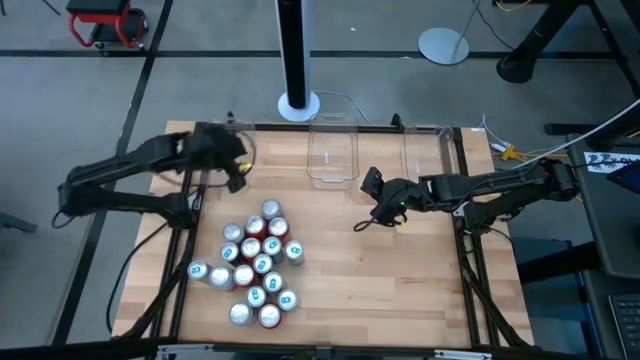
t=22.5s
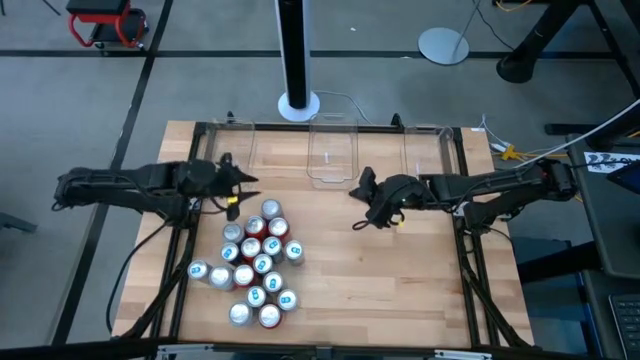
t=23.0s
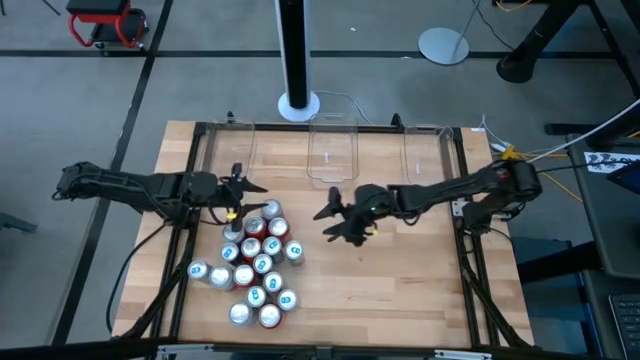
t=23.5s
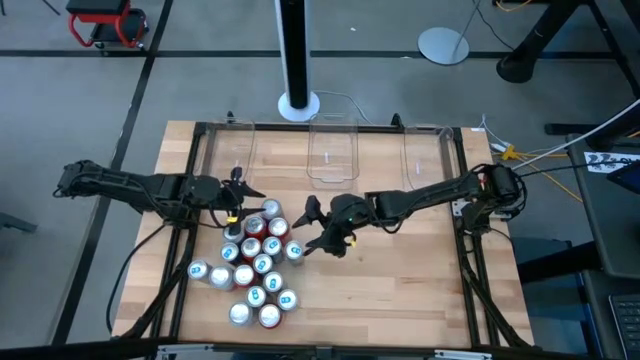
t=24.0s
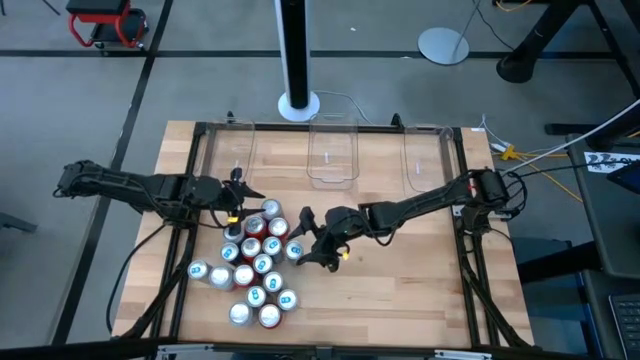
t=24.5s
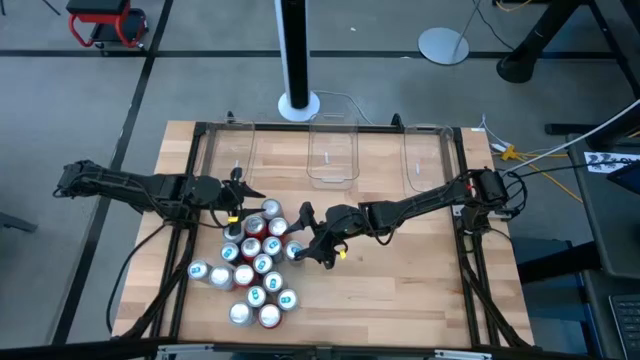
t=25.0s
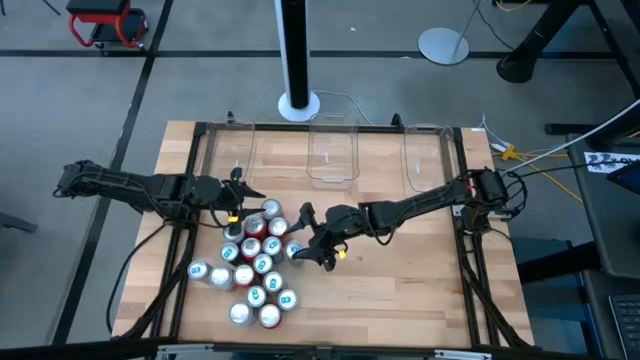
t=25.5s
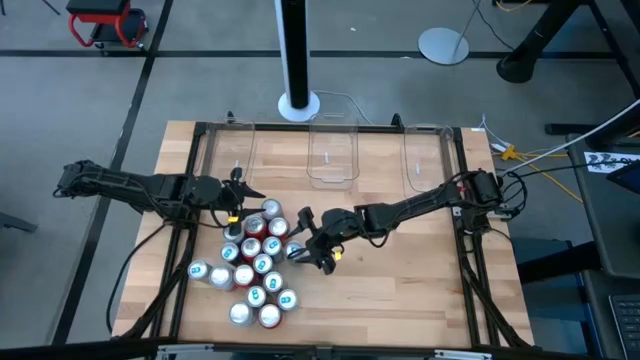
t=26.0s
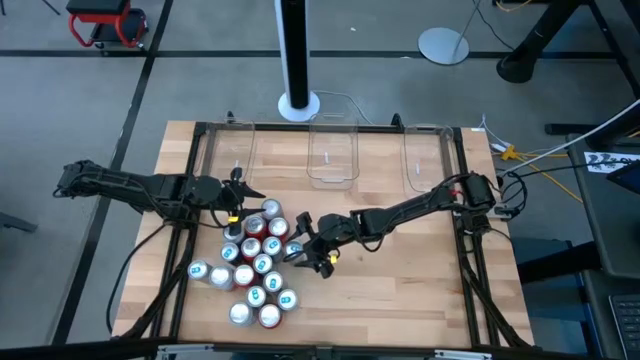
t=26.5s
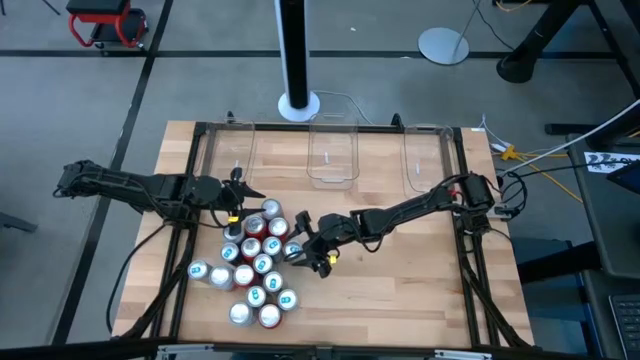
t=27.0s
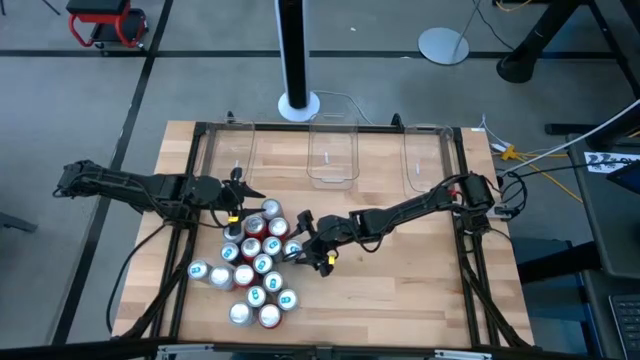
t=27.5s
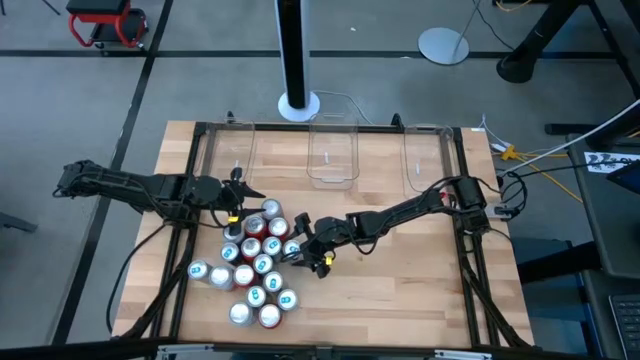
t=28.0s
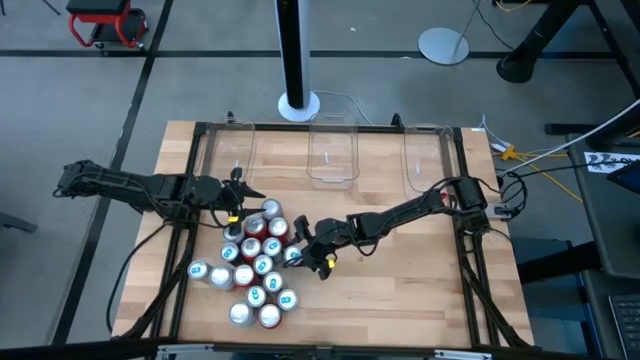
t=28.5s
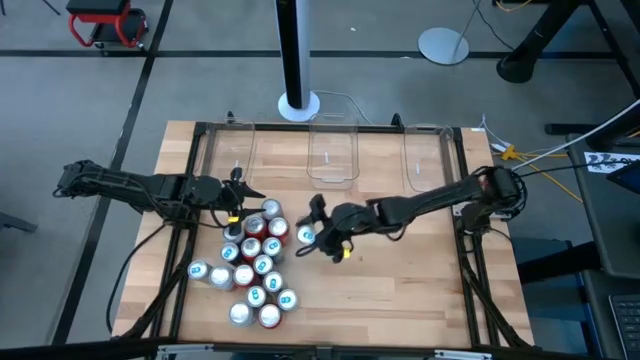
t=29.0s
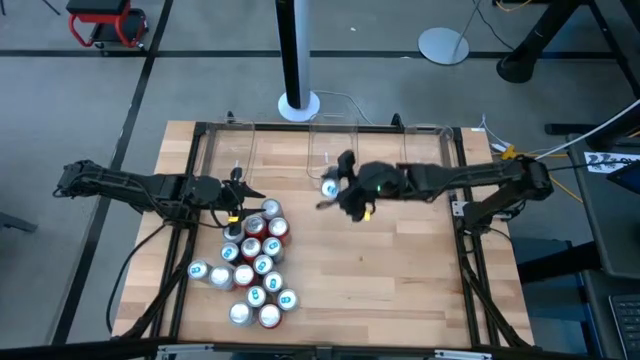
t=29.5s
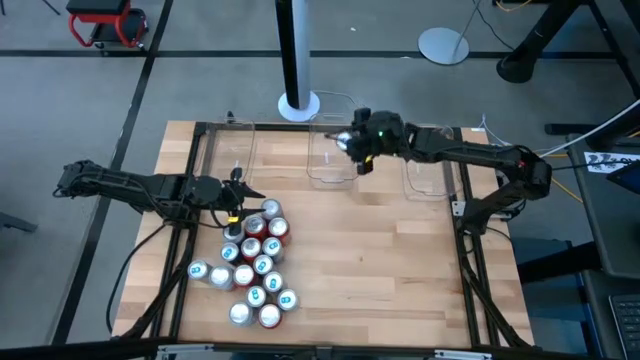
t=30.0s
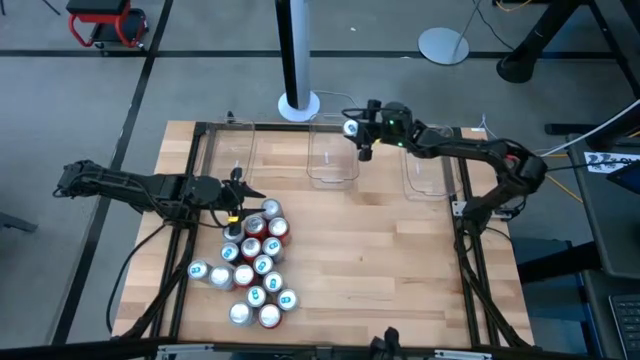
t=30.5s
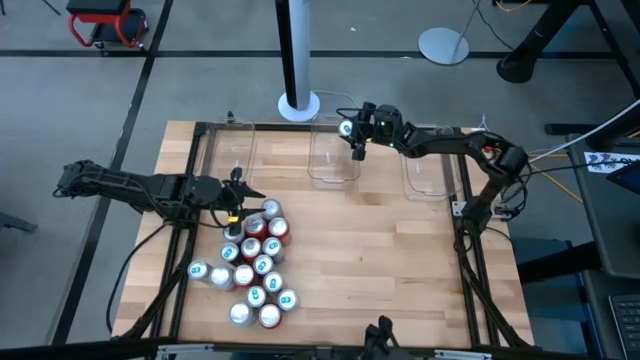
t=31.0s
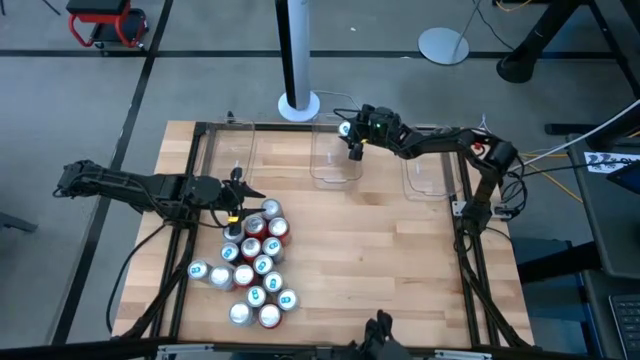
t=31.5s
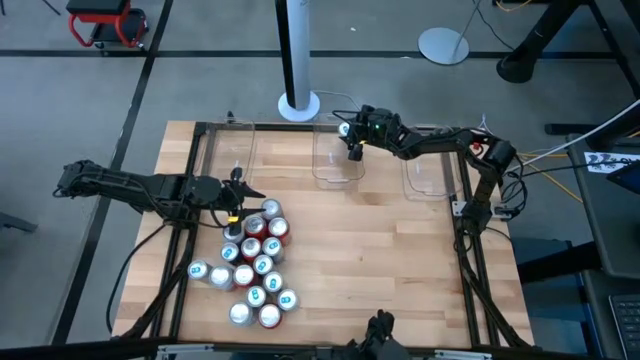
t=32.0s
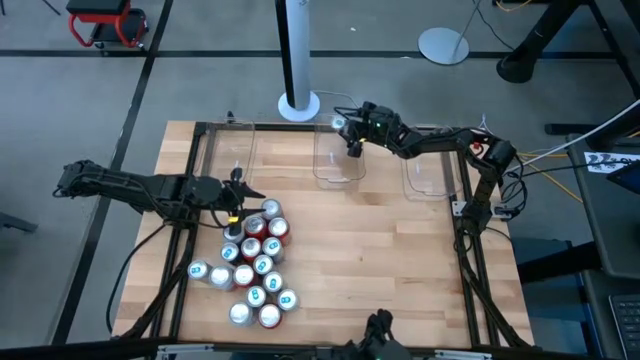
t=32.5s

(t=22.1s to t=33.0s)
Task: Sort soda cans
Put the blue soda can into the middle transparent bin

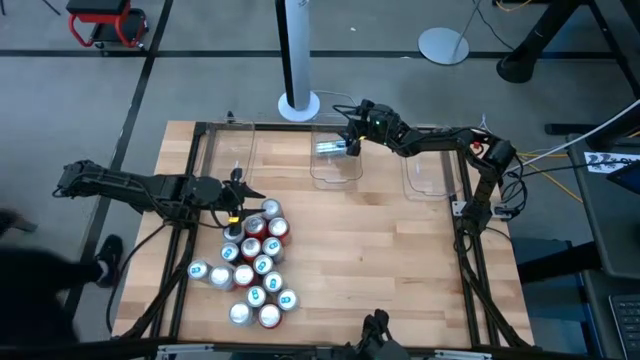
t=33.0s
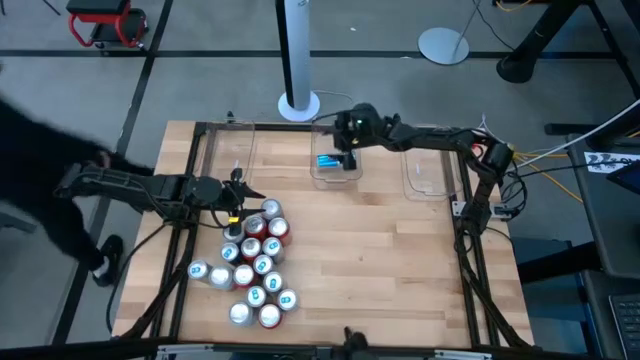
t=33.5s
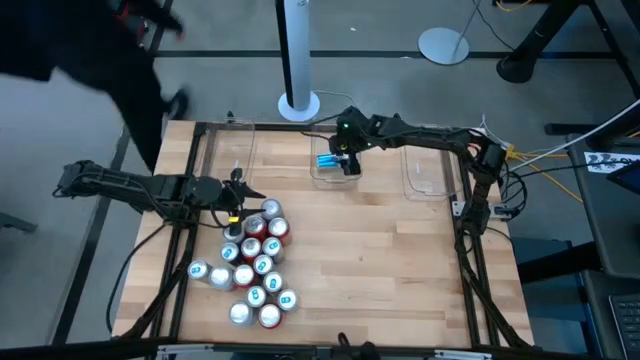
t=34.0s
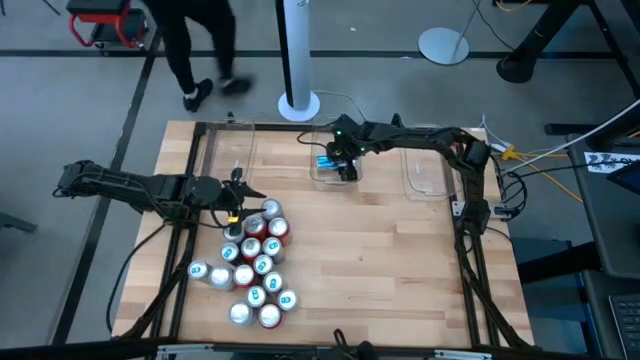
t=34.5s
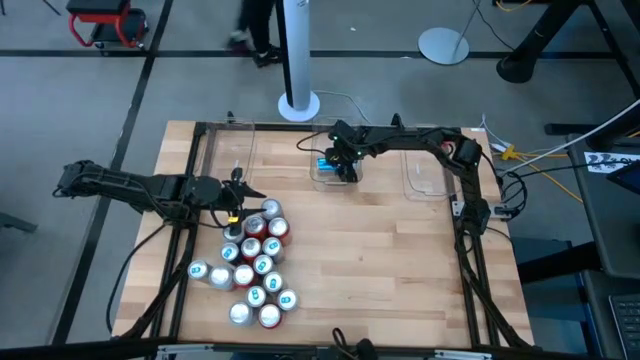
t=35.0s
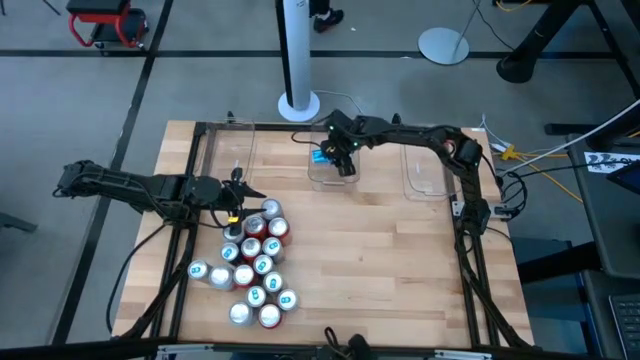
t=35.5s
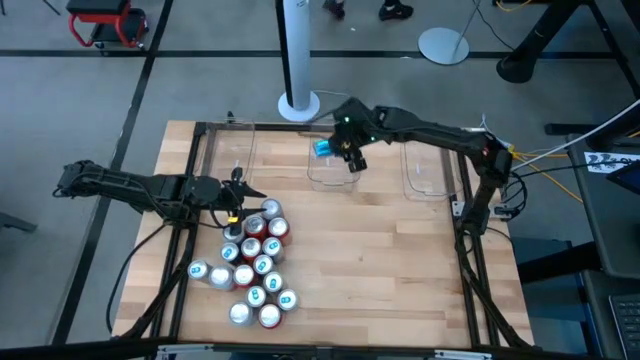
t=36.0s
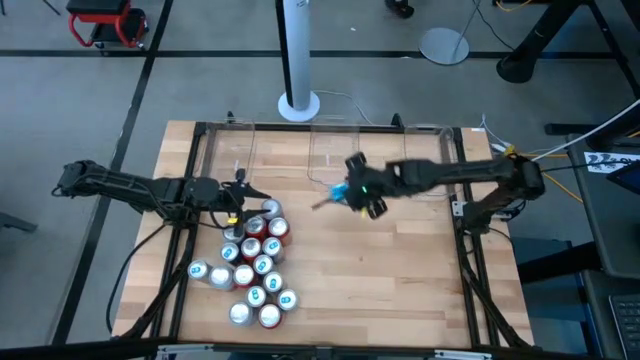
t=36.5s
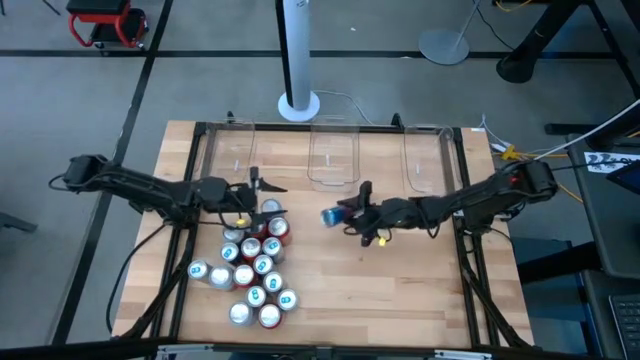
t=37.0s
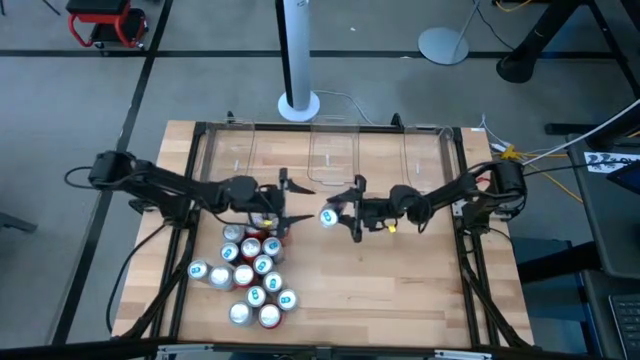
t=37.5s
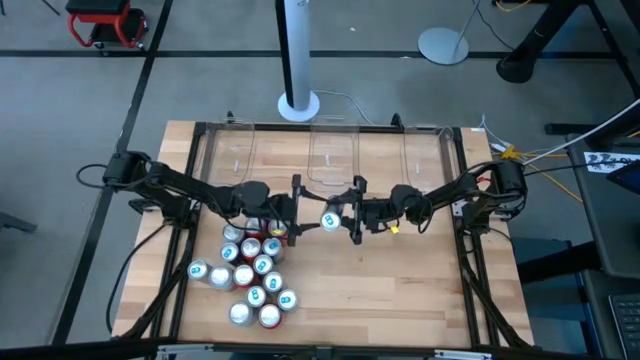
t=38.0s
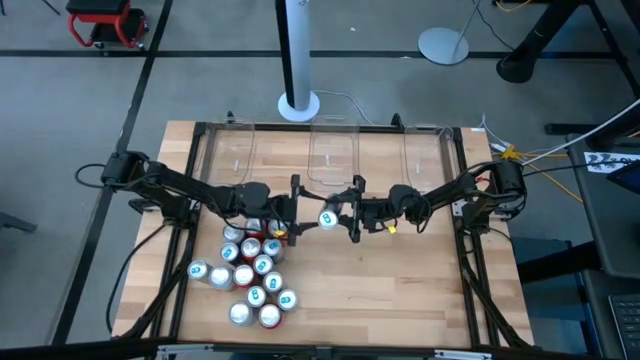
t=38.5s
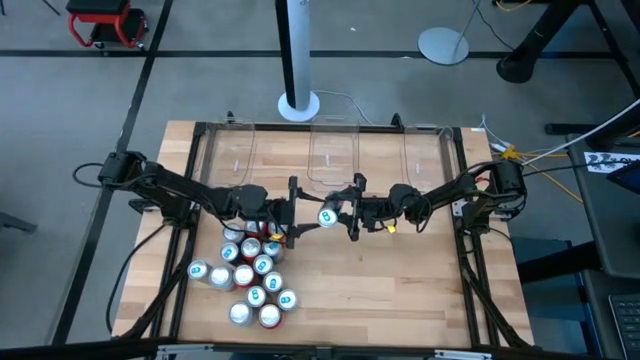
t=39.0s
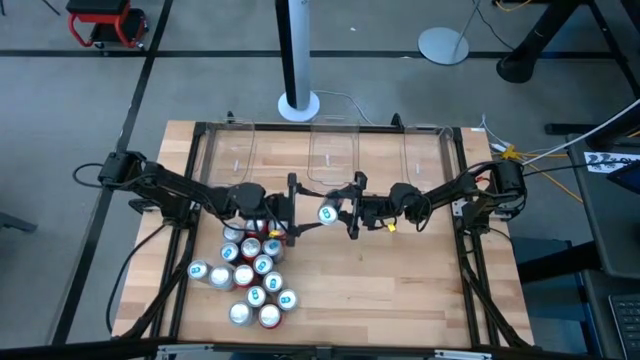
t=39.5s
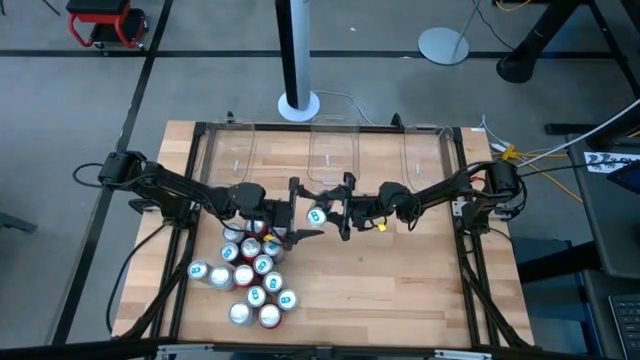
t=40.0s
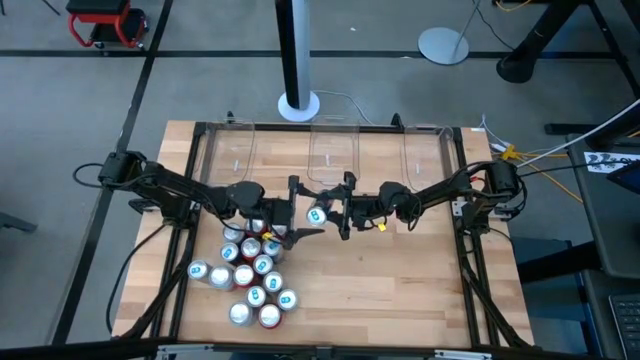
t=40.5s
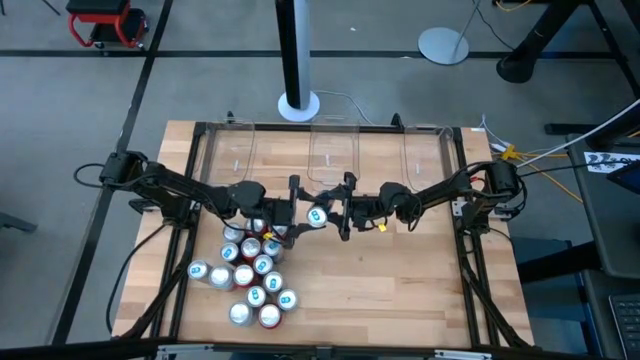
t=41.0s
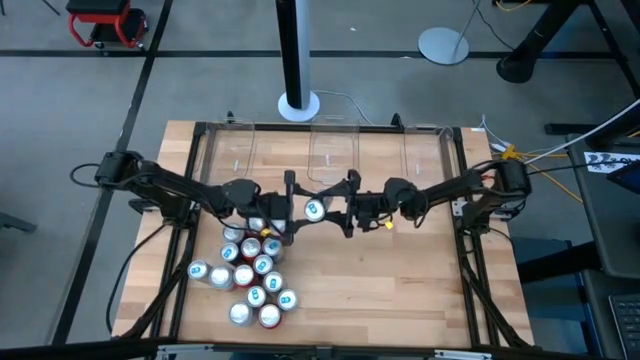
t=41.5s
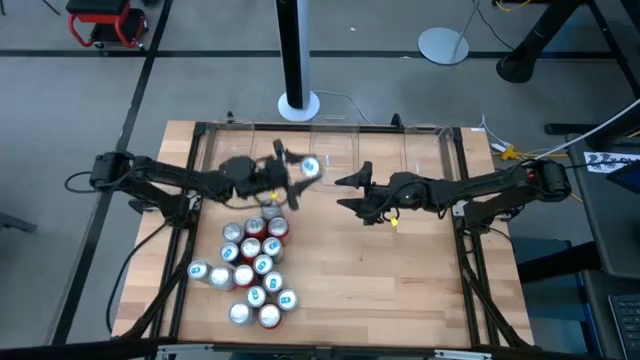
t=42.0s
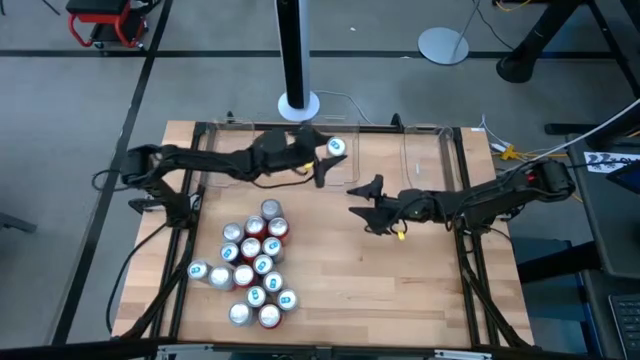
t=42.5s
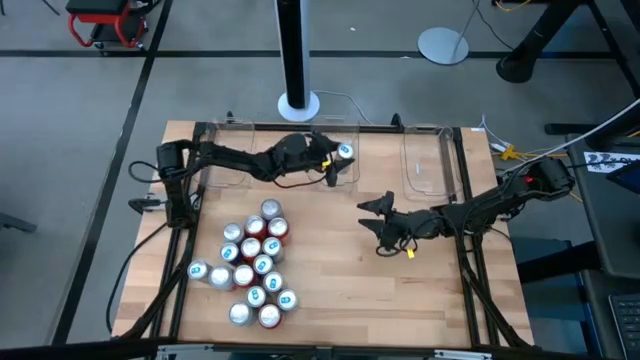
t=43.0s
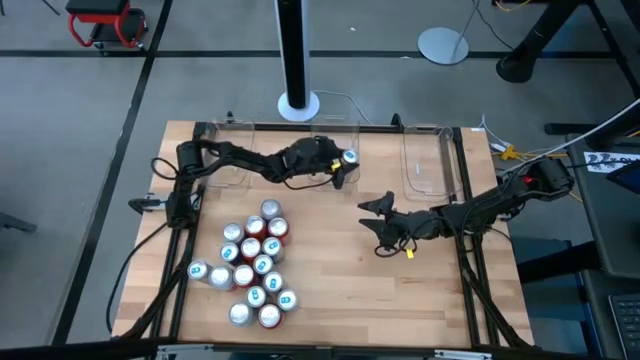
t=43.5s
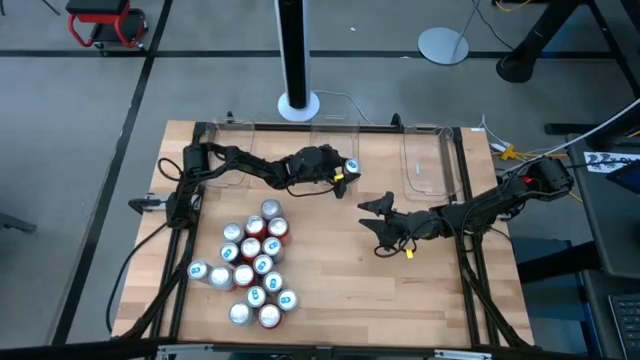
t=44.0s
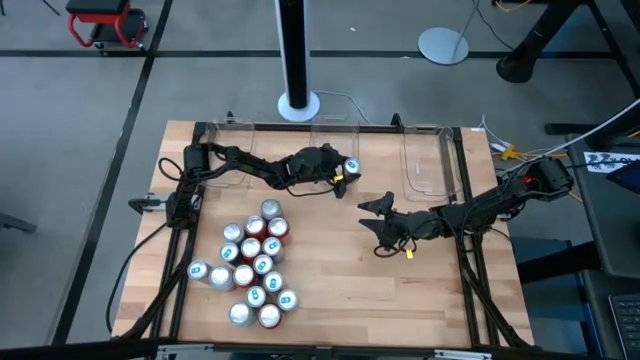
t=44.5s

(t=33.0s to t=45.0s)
Put the blue soda can into the middle transparent bin
